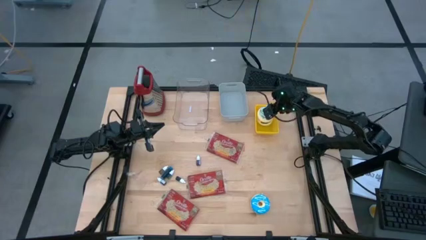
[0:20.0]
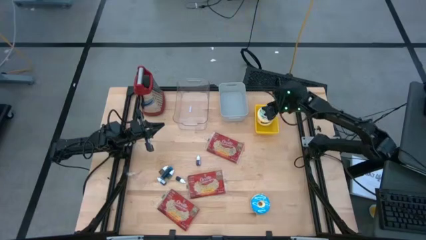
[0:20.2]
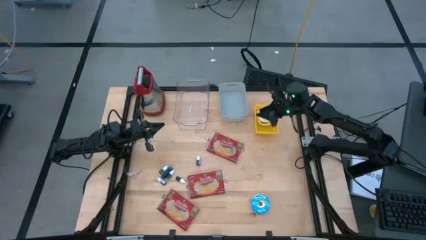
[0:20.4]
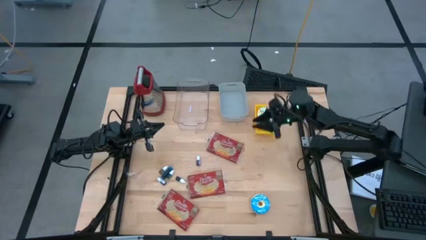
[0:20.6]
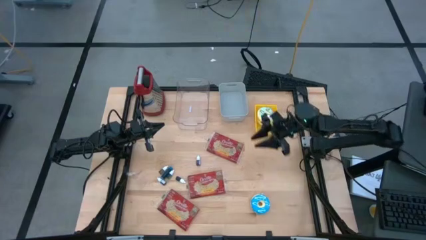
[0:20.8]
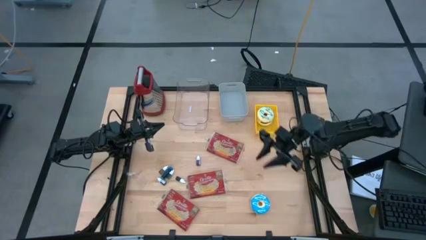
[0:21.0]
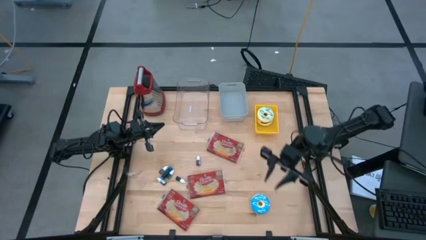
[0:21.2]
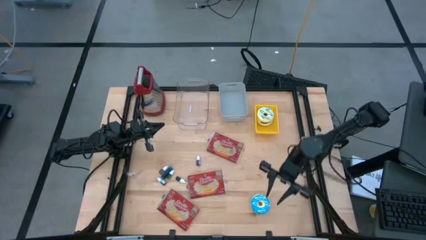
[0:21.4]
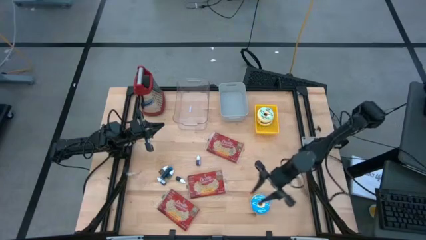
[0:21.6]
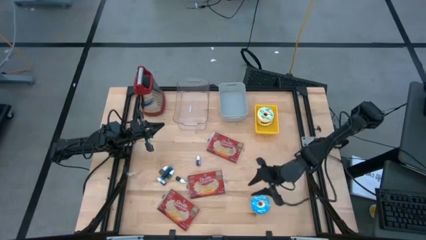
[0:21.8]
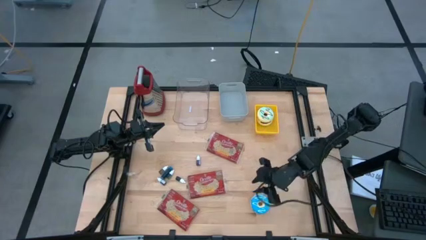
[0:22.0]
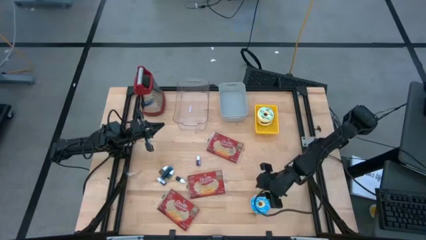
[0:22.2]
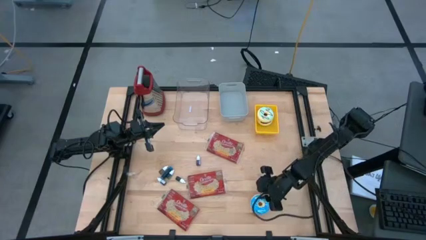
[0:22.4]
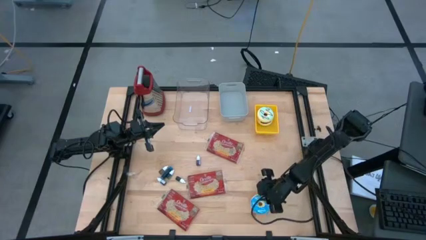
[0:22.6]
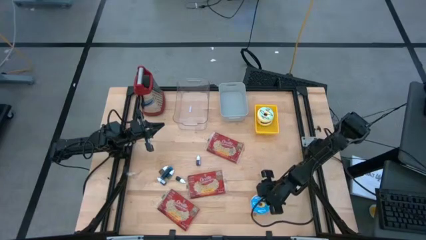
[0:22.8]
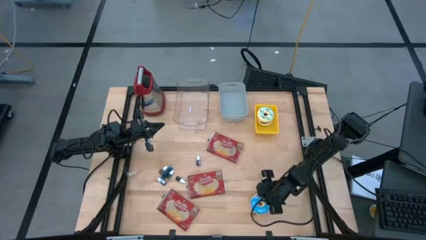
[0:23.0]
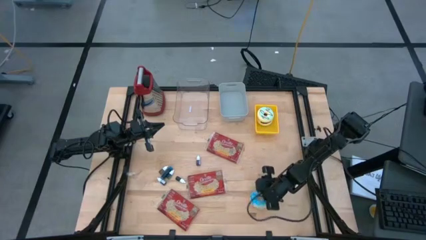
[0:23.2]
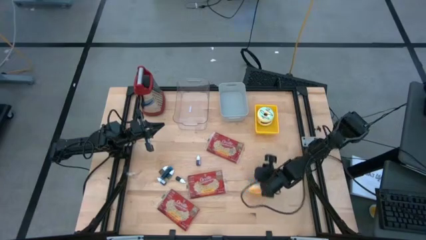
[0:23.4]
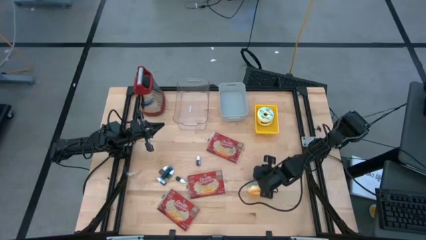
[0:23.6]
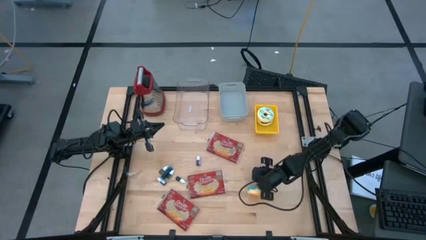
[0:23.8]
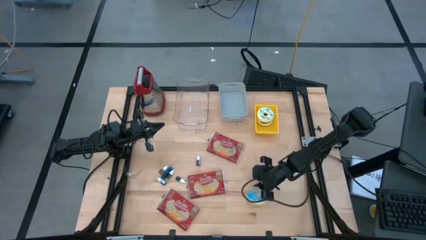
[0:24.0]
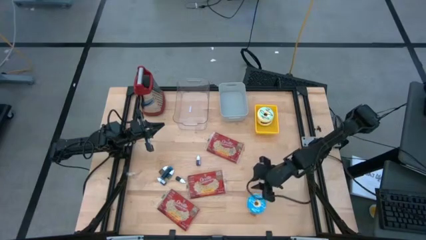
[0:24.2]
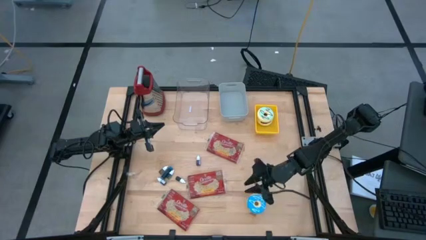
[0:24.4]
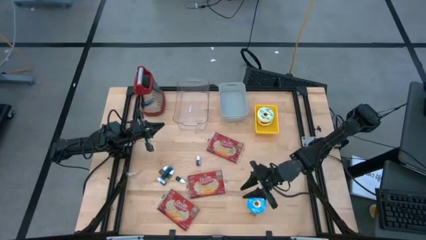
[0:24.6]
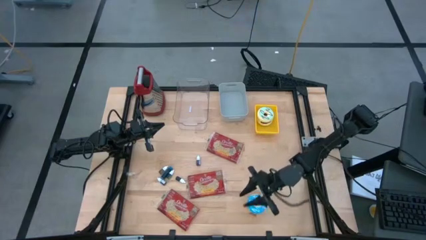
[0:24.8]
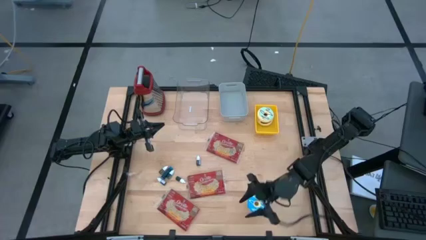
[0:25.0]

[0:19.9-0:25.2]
Task: Pick & Place Food Item
Put the blue donut into the yellow bin

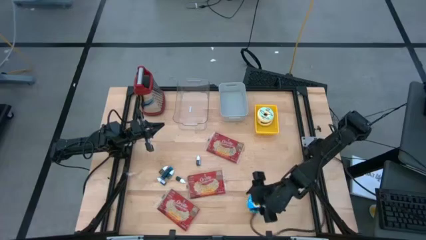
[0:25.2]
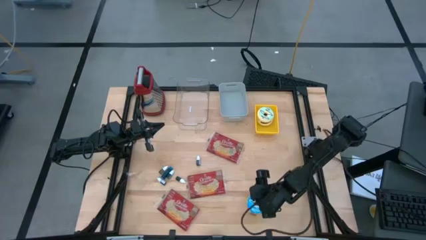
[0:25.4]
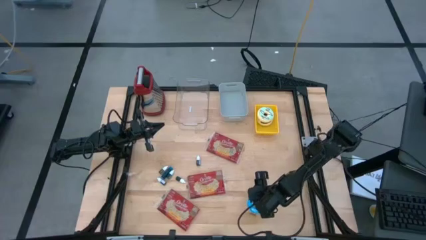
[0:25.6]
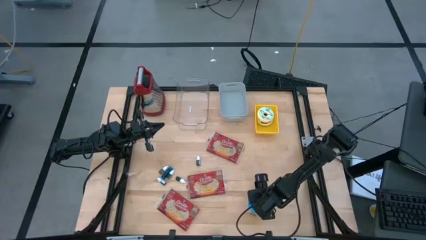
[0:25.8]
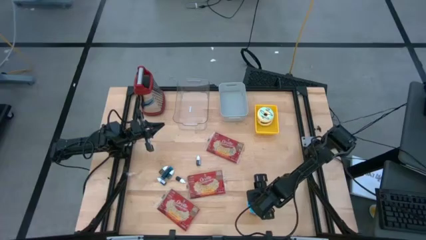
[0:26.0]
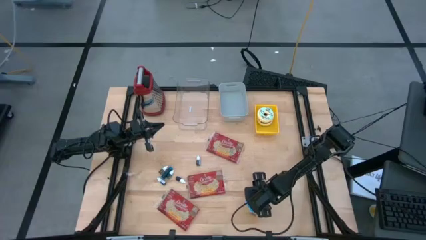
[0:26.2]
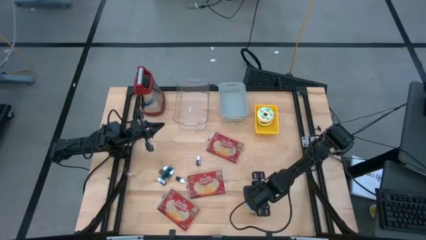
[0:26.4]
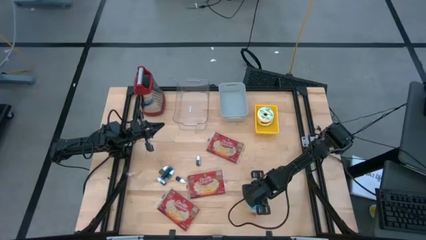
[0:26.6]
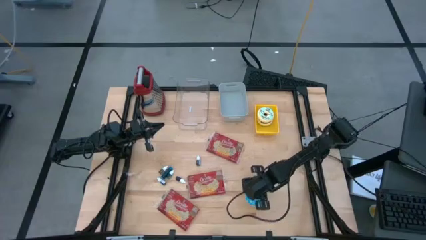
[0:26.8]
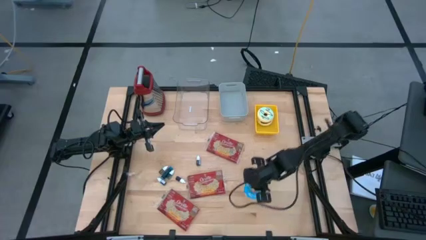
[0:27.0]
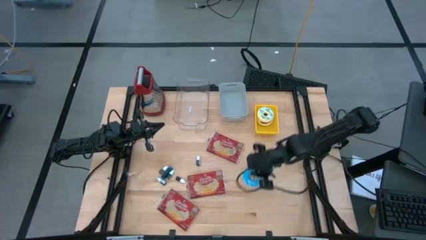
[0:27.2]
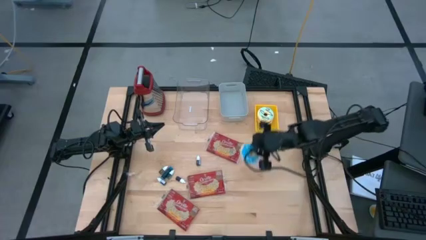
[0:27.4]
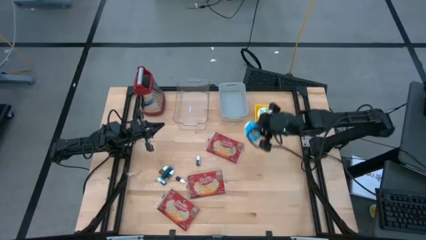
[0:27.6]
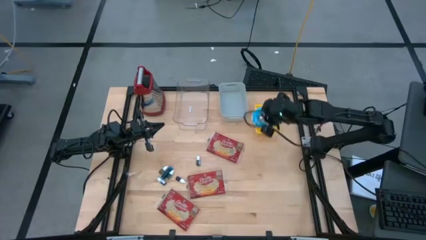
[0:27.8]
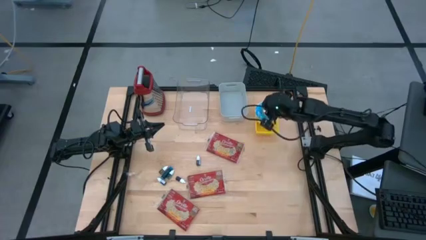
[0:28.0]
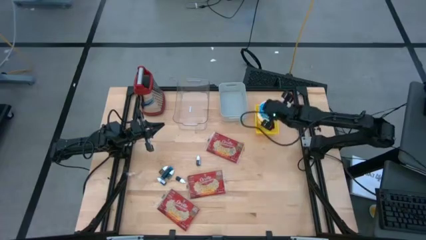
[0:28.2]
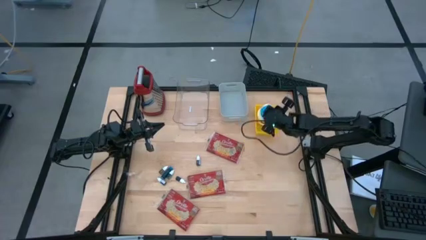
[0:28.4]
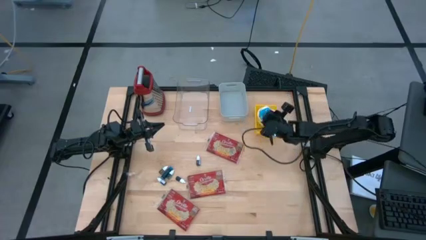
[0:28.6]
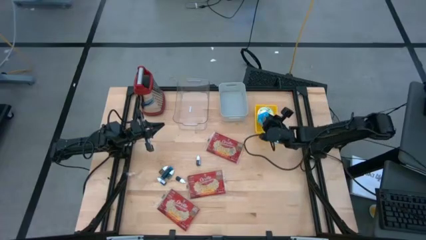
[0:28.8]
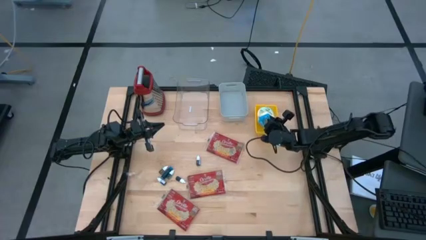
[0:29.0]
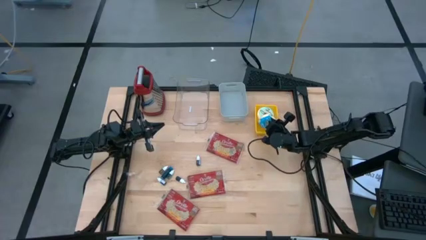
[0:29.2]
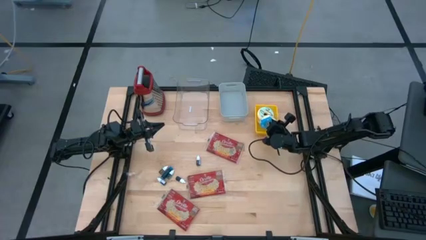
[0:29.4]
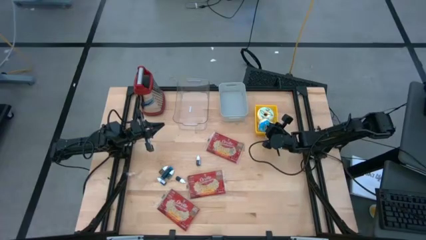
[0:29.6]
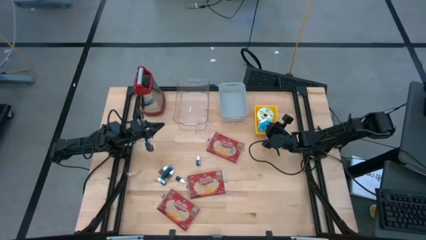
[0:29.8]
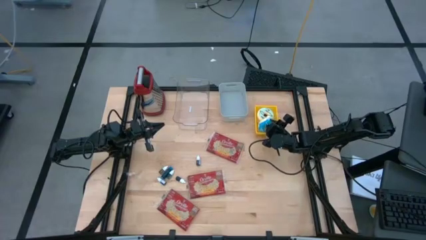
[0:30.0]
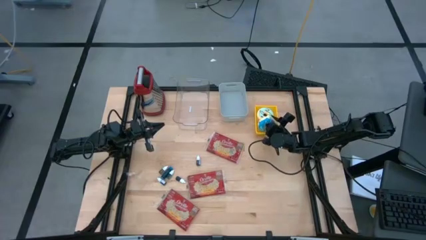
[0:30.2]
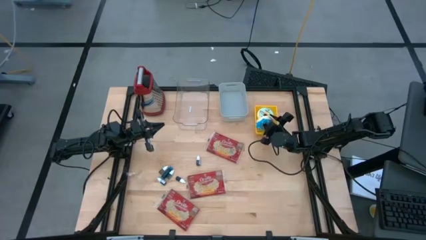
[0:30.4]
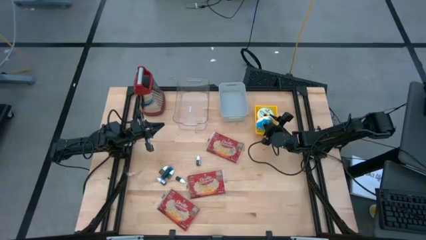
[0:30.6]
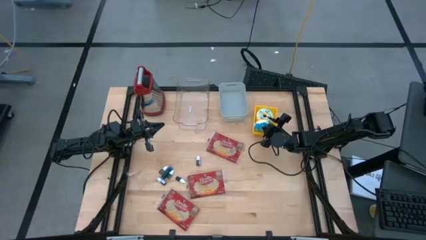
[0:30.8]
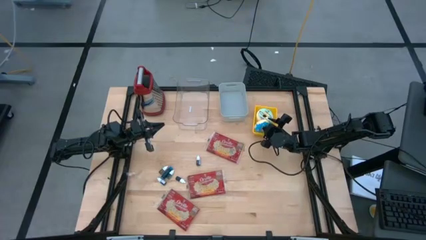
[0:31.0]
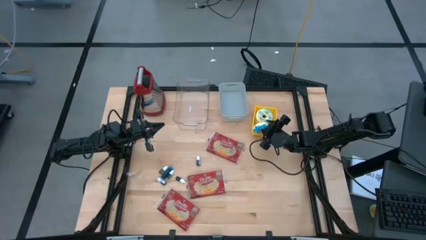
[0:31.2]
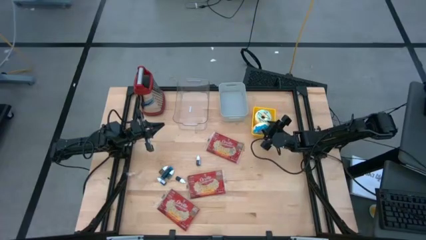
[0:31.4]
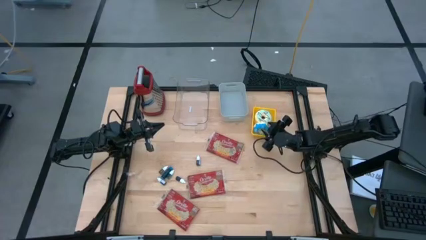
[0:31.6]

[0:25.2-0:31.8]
Put the blue donut into the yellow bin

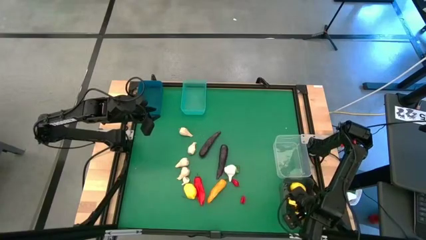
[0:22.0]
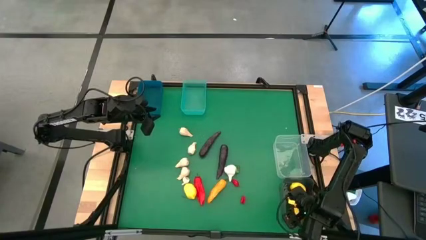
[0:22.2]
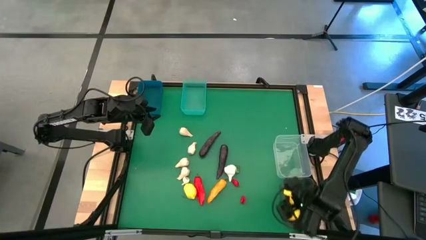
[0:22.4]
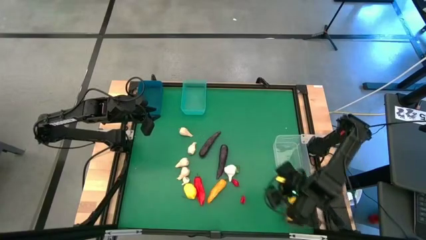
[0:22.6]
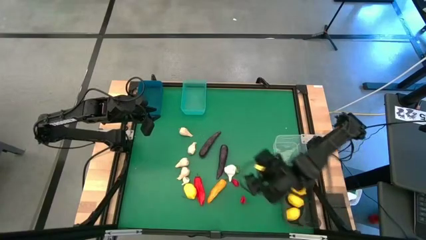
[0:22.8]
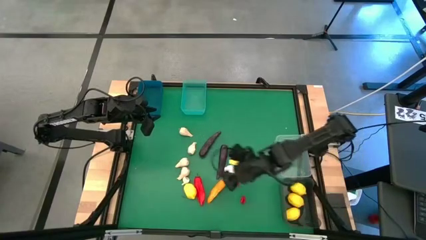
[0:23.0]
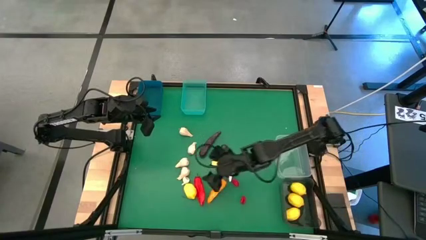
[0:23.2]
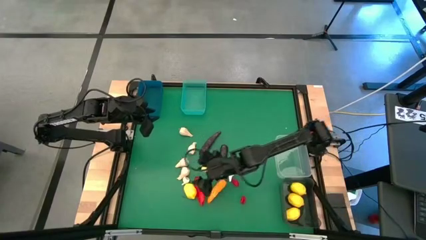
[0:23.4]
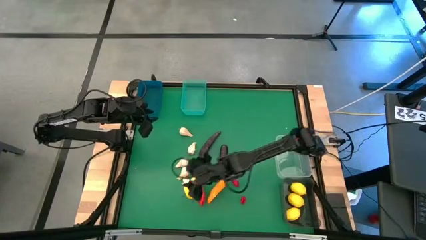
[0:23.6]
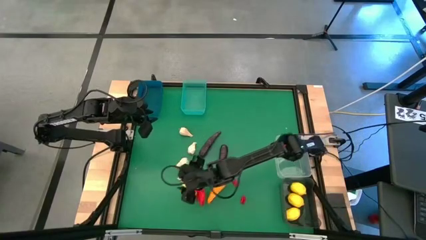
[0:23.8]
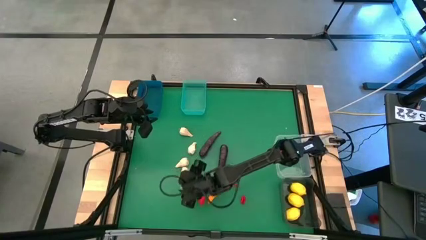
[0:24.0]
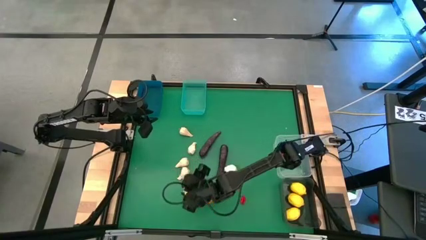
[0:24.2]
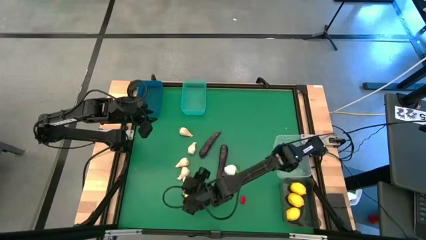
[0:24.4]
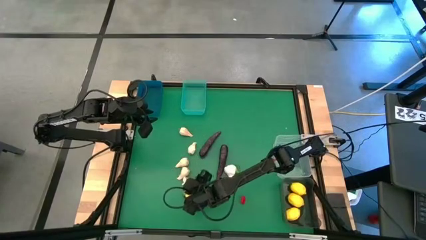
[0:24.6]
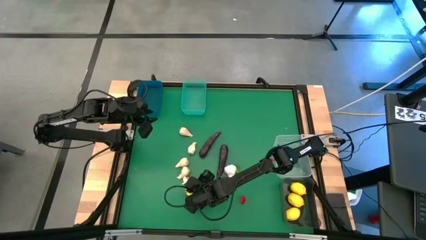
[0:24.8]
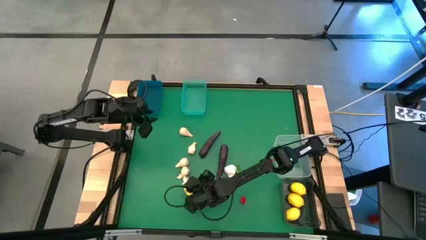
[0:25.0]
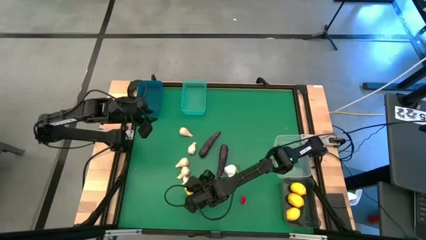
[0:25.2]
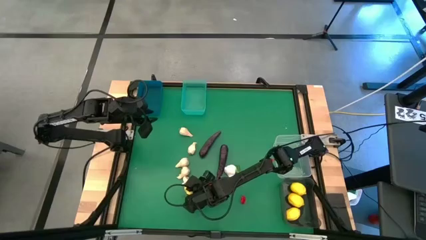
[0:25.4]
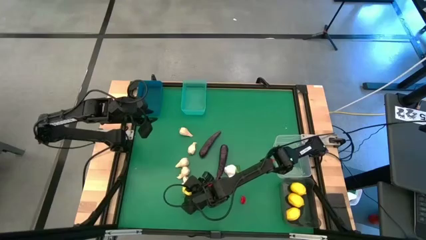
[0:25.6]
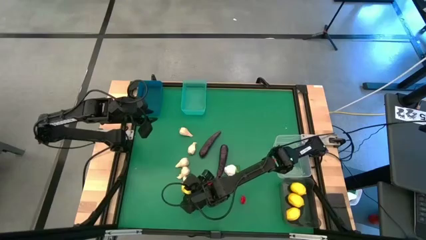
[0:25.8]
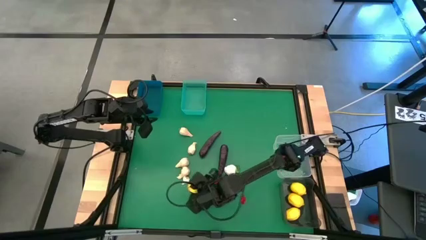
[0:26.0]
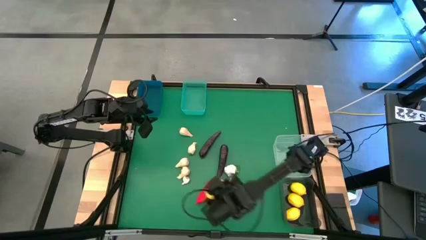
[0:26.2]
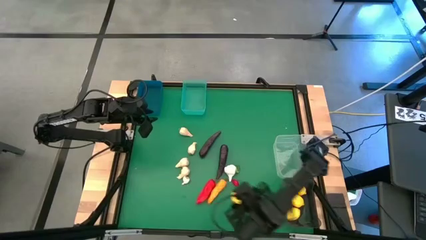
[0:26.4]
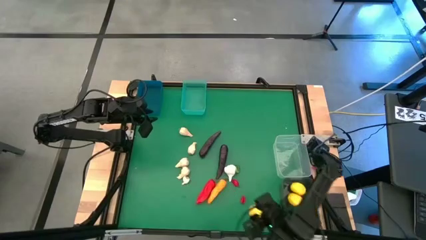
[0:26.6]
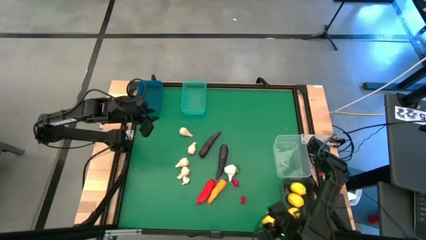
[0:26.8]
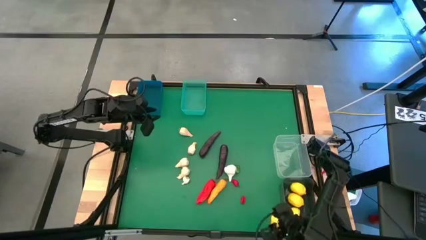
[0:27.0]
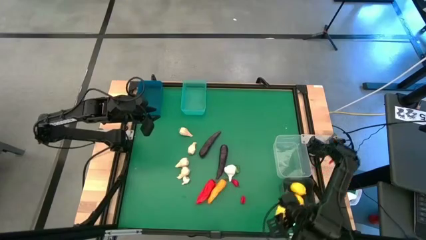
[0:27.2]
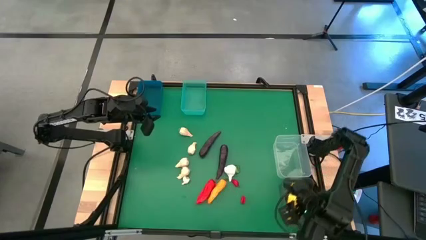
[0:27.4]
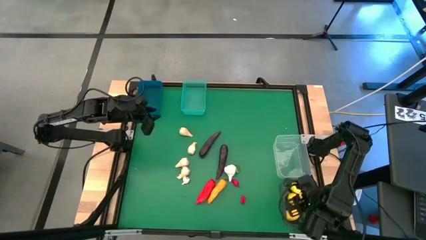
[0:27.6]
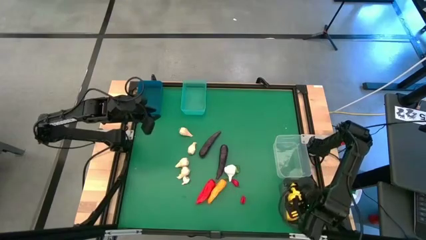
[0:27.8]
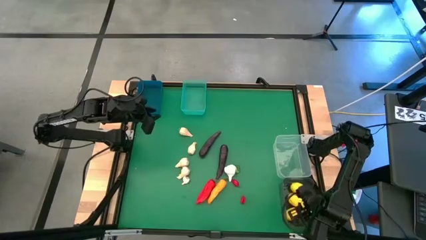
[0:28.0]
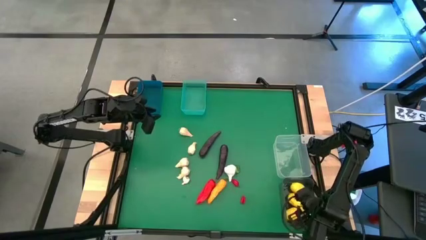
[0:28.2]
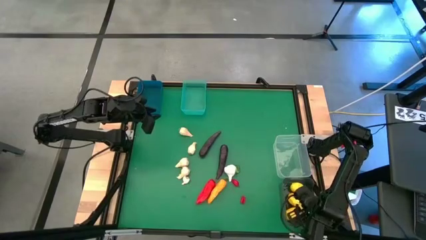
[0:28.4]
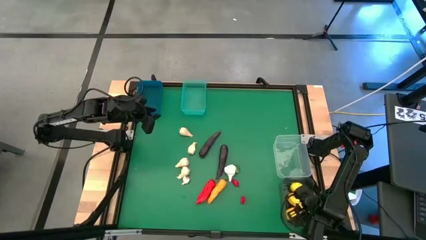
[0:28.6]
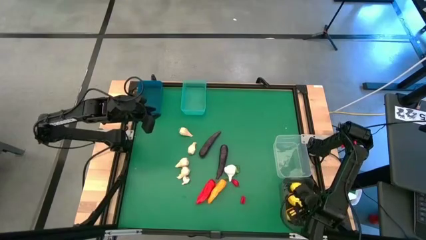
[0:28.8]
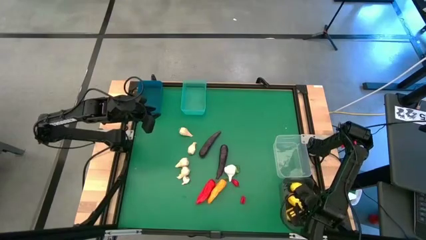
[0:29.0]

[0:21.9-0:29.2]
Task: Sort produce into baskets
Put the yellow lemon into the black bin
